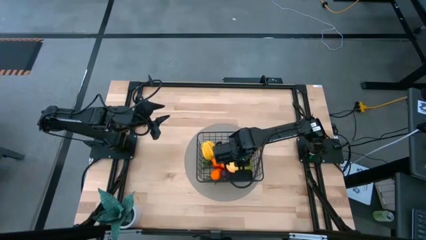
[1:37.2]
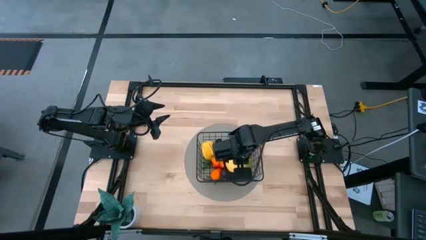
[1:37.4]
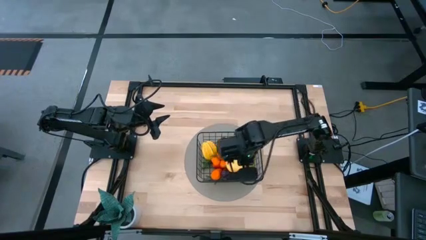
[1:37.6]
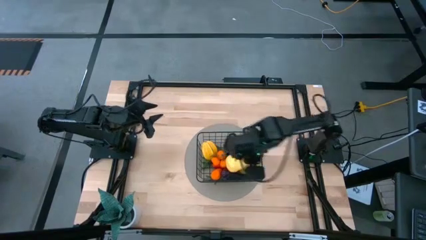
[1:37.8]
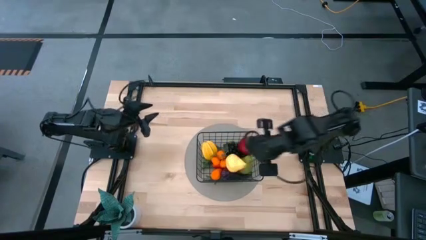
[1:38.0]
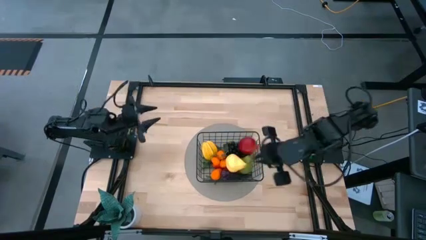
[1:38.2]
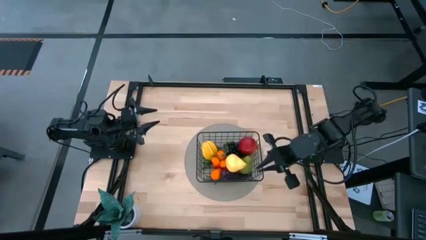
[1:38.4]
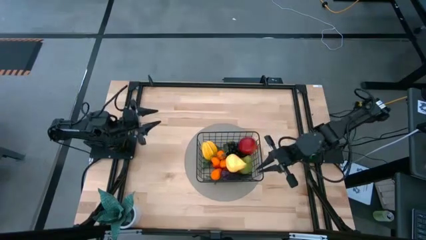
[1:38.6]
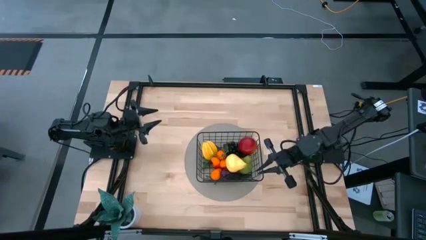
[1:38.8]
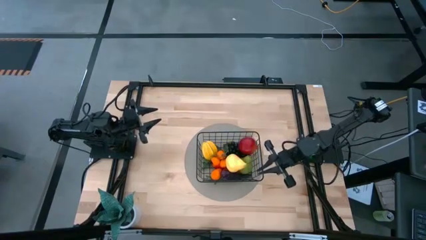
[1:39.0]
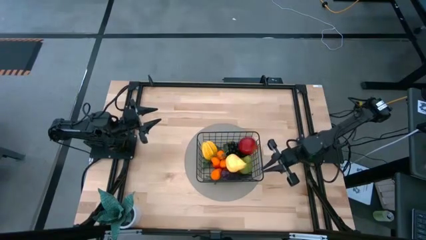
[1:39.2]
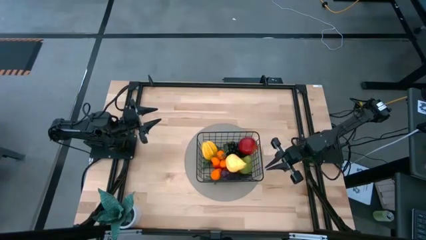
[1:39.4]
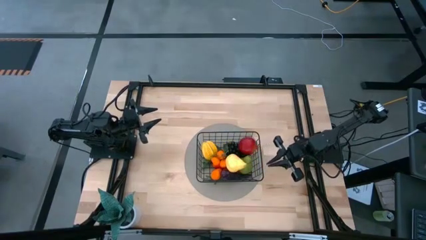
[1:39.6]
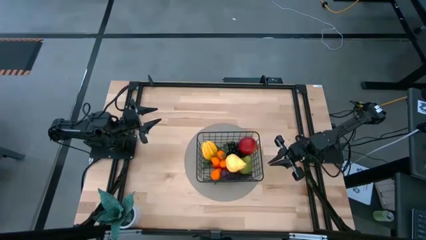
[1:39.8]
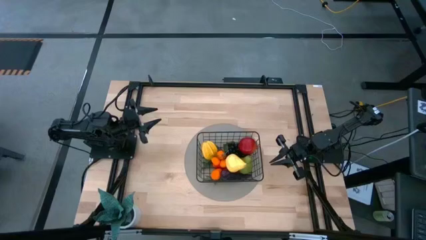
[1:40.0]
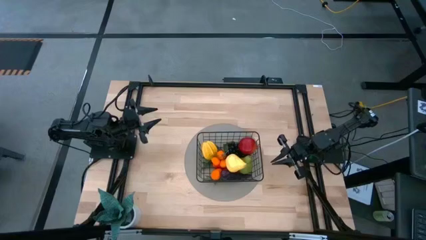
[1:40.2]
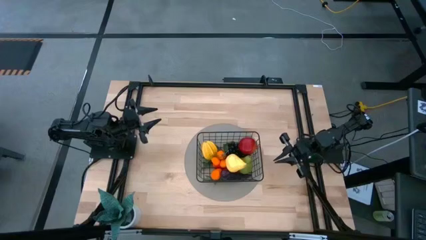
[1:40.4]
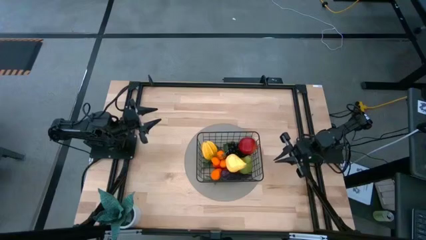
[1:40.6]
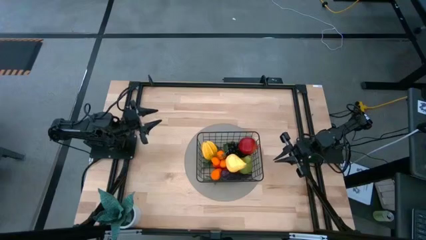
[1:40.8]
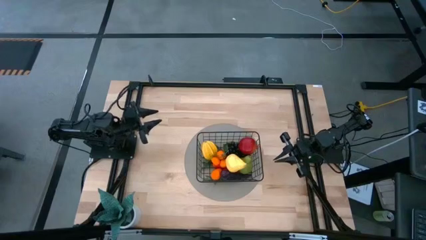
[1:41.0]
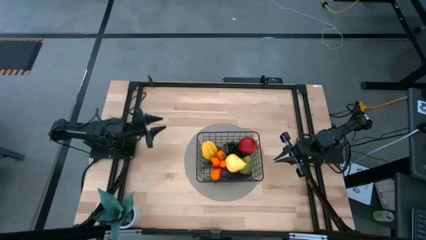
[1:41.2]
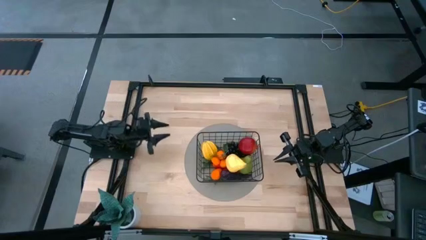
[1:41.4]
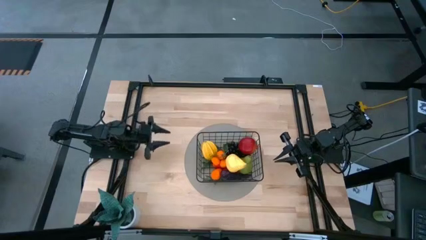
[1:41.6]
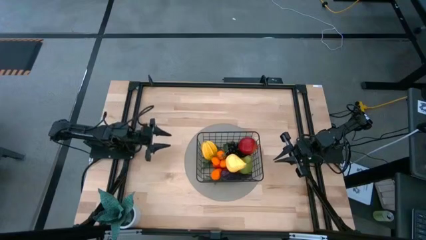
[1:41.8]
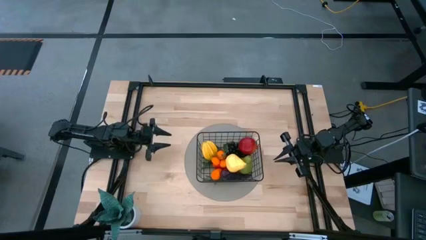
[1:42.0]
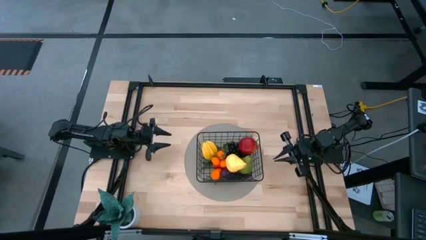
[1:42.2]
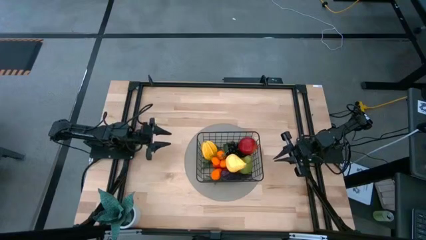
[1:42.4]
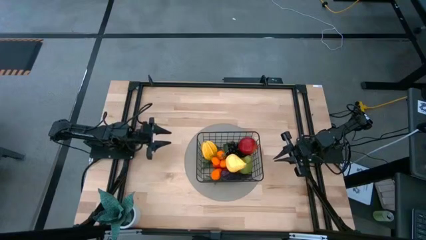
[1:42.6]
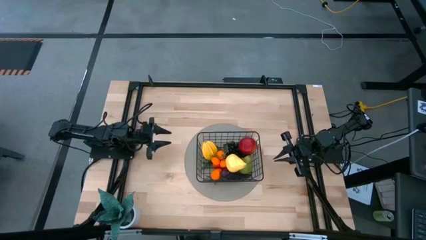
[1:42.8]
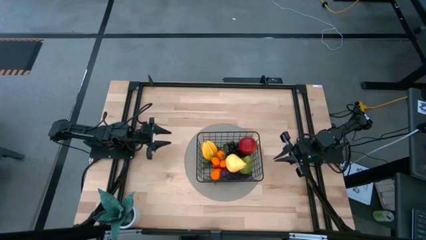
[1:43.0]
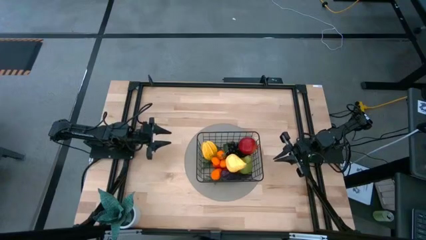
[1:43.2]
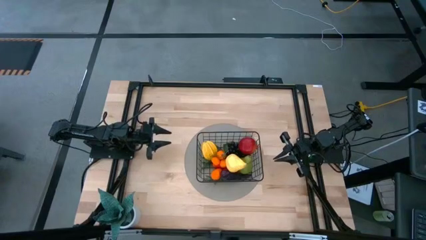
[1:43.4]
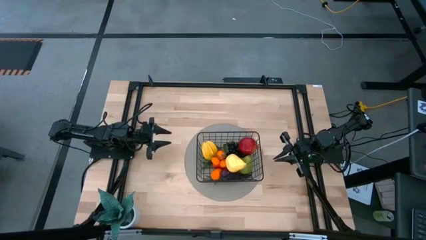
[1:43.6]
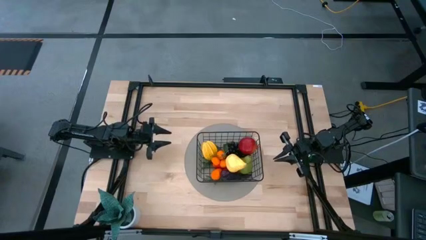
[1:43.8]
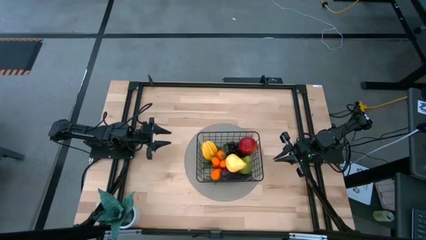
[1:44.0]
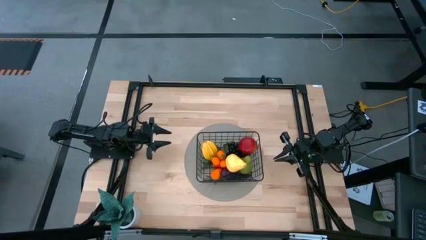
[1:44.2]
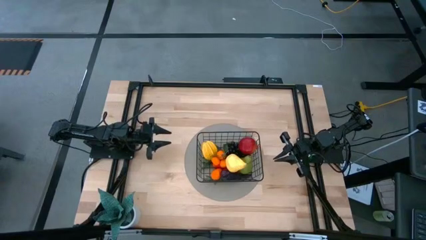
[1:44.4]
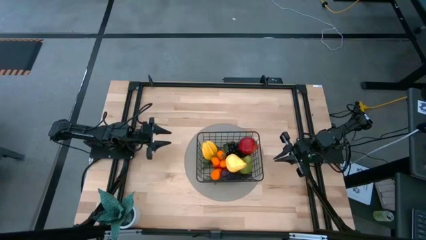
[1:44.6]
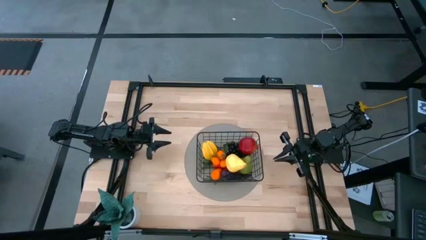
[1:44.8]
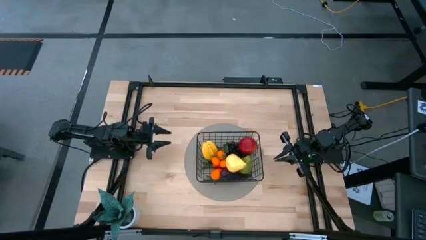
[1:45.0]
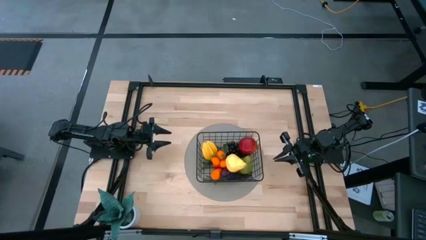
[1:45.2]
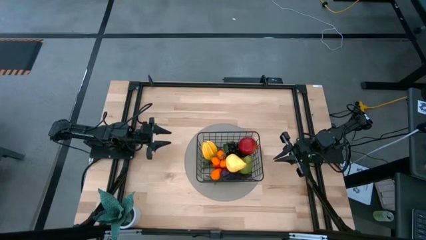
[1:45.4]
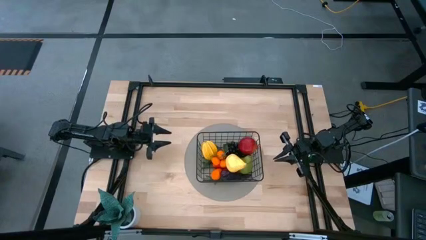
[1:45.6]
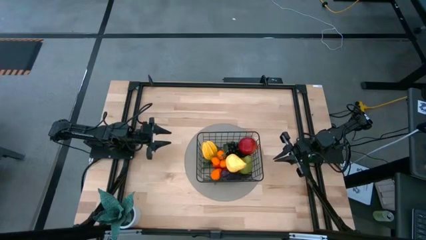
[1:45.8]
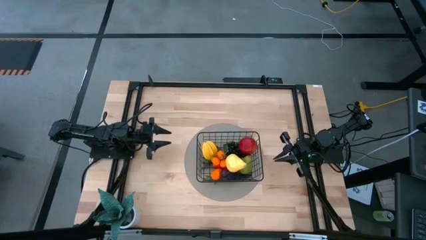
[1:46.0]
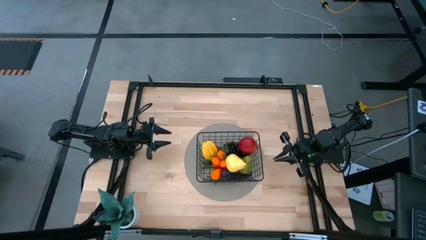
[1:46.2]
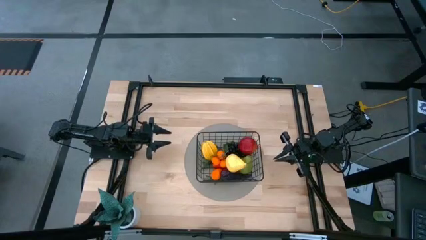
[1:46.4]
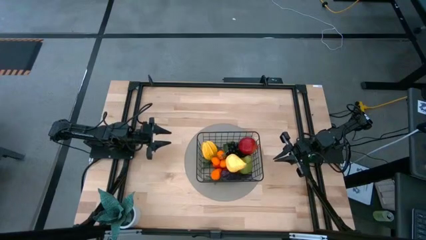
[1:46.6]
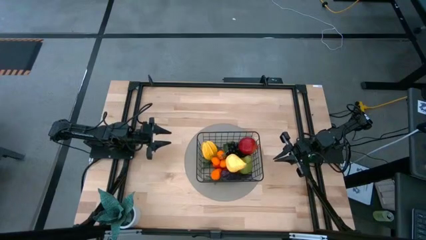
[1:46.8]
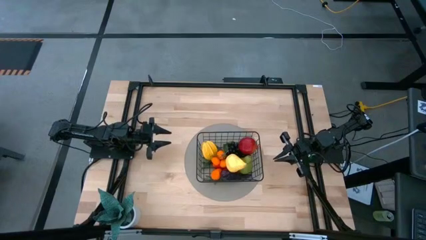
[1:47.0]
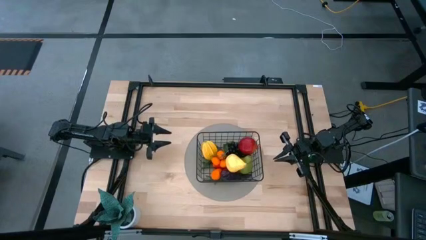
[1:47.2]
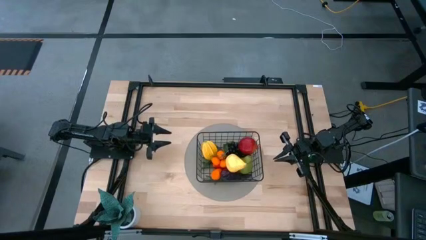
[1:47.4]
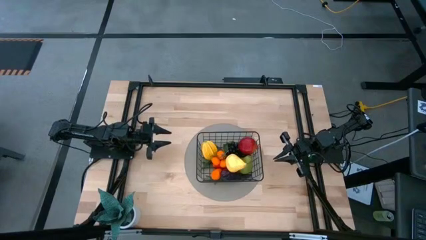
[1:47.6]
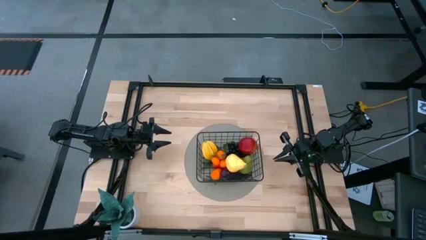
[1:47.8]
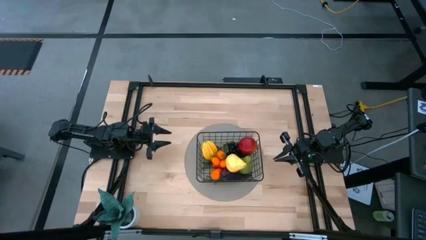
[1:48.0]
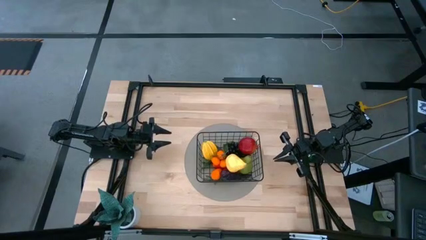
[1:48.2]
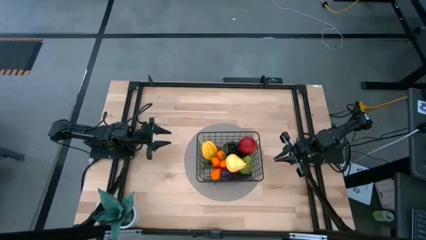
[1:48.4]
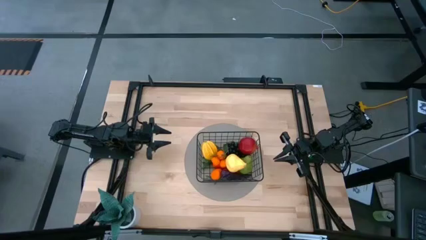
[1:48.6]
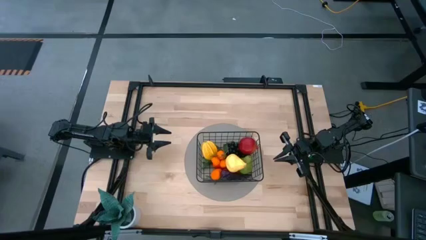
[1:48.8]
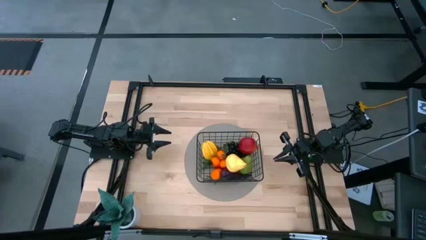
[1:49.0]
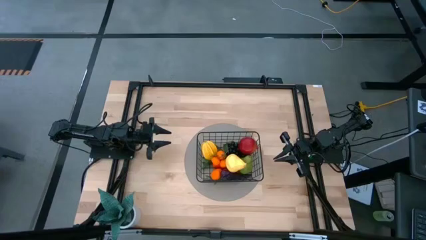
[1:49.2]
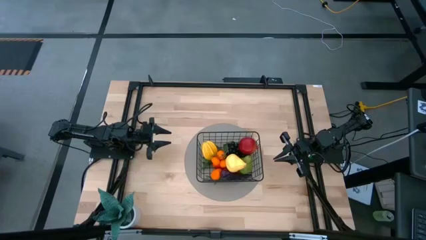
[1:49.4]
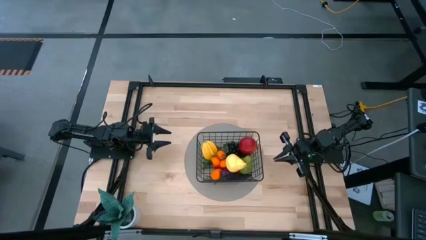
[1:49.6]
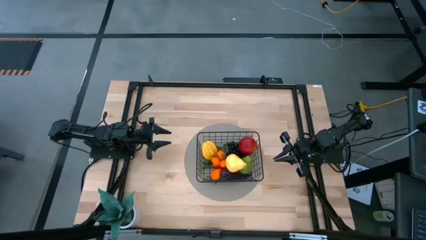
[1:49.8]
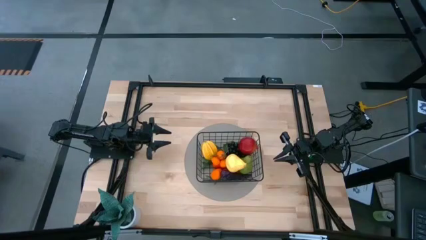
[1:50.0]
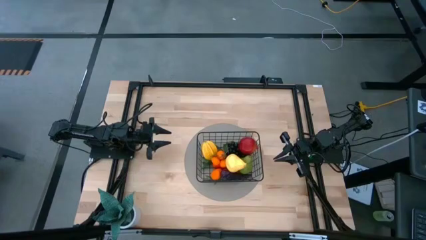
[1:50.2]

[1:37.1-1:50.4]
Task: Build produce basket
Return to Home Position
